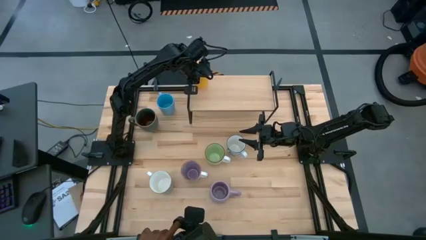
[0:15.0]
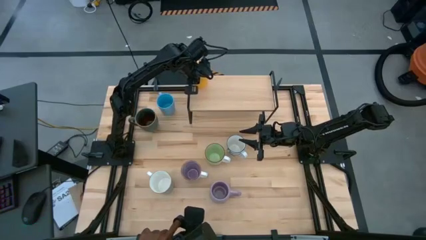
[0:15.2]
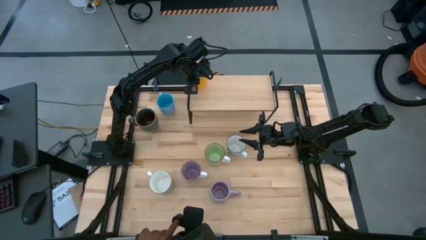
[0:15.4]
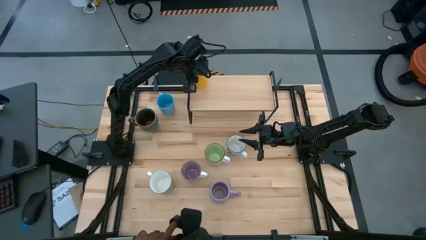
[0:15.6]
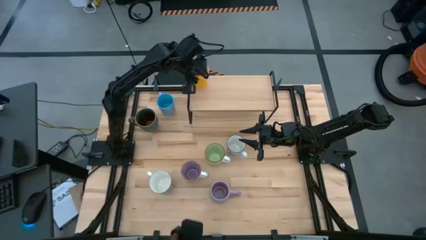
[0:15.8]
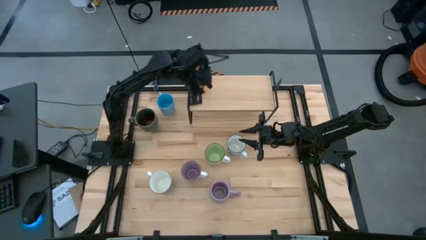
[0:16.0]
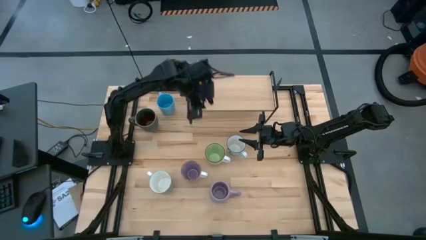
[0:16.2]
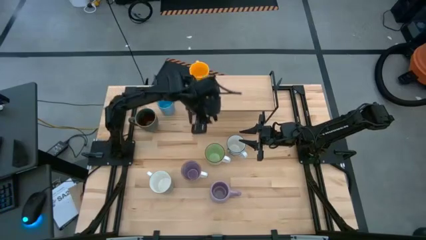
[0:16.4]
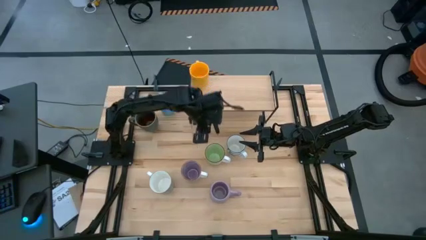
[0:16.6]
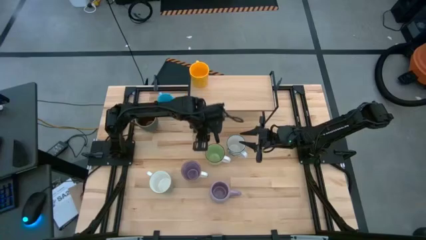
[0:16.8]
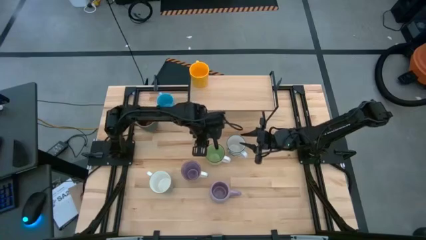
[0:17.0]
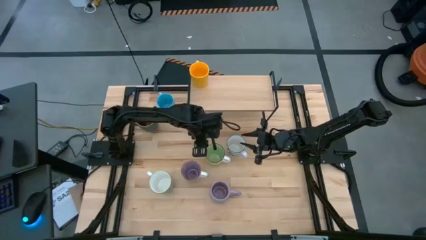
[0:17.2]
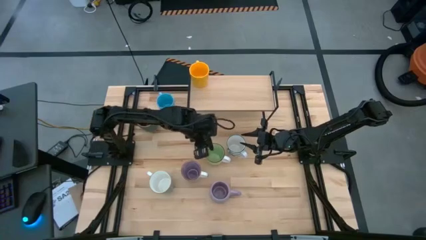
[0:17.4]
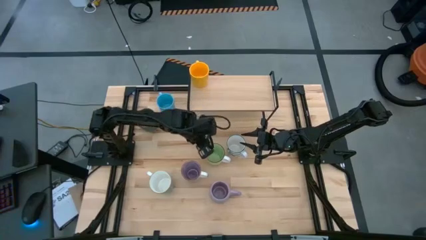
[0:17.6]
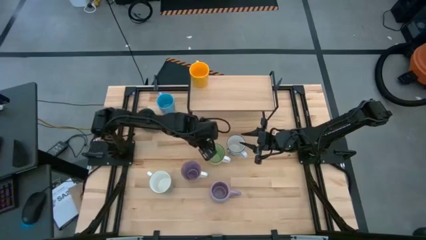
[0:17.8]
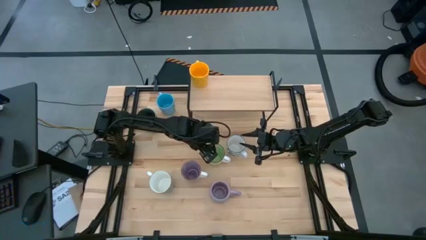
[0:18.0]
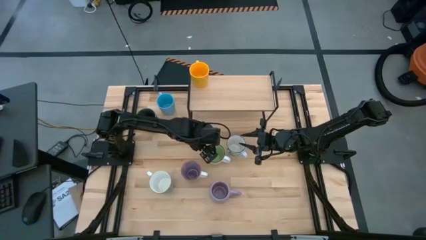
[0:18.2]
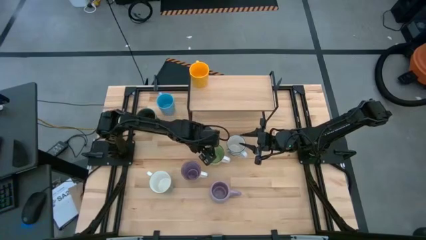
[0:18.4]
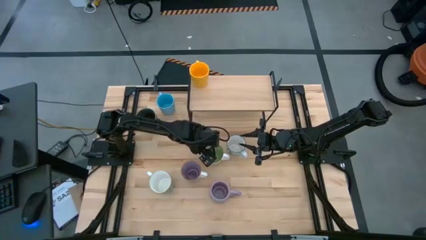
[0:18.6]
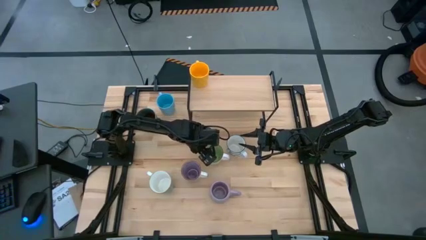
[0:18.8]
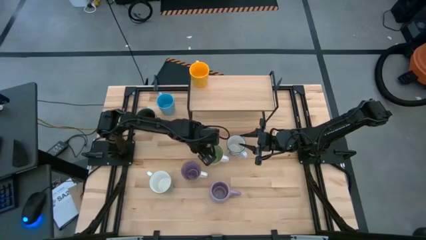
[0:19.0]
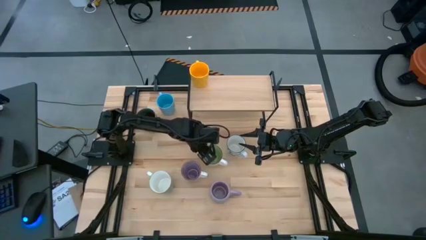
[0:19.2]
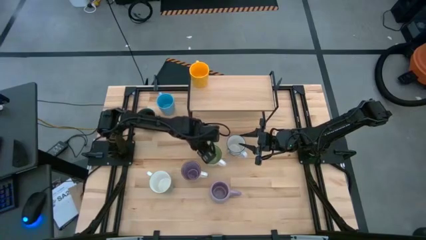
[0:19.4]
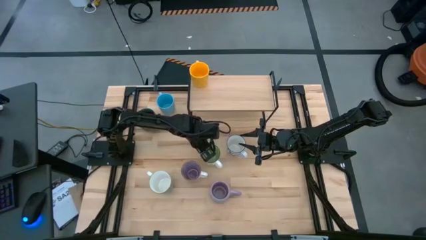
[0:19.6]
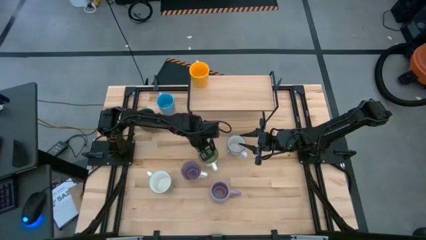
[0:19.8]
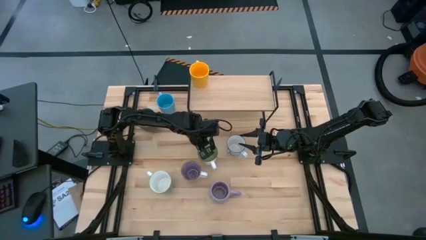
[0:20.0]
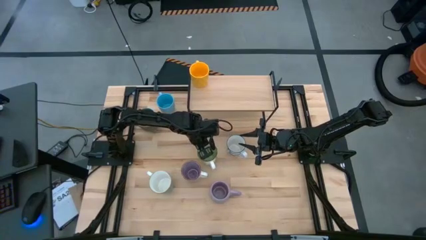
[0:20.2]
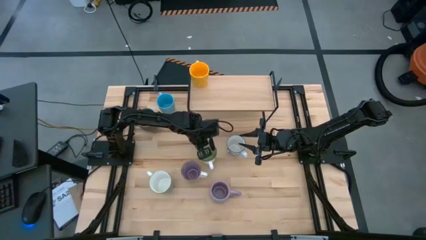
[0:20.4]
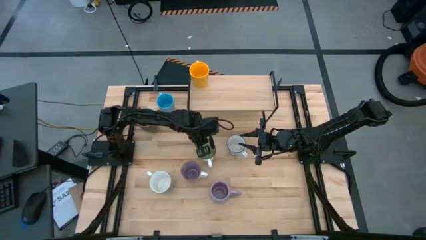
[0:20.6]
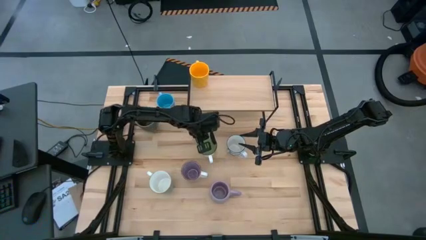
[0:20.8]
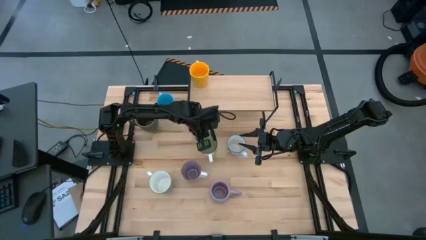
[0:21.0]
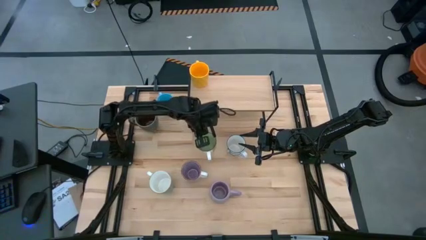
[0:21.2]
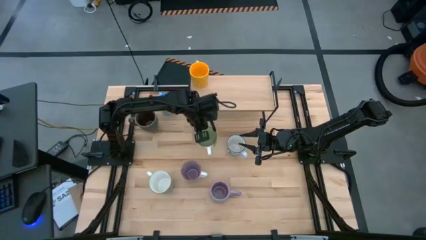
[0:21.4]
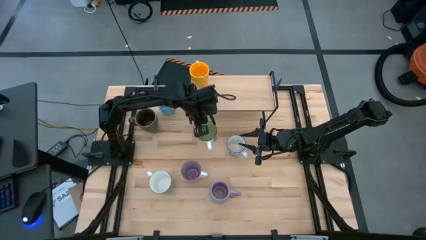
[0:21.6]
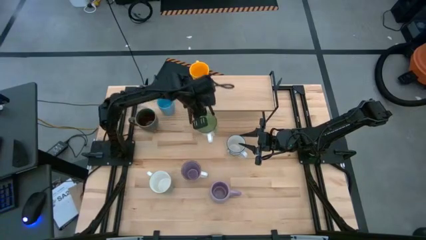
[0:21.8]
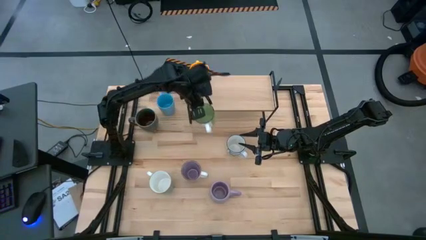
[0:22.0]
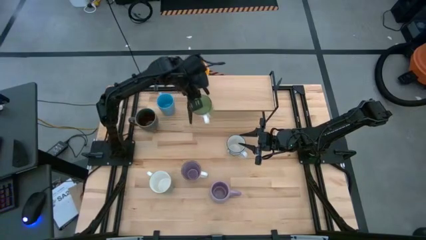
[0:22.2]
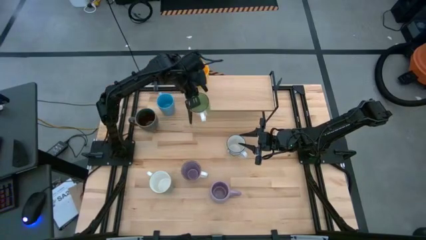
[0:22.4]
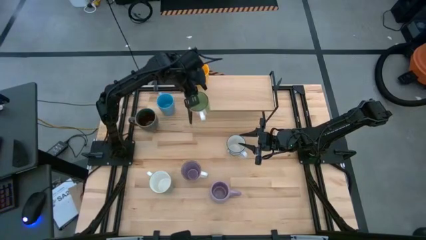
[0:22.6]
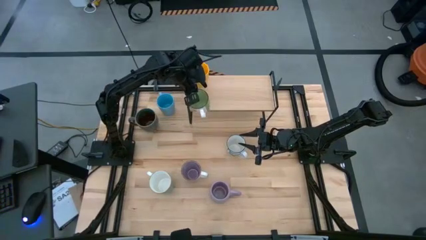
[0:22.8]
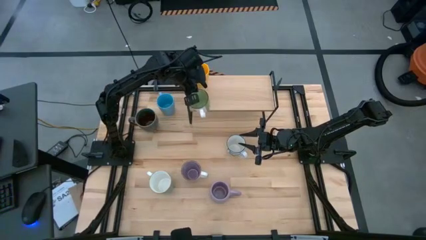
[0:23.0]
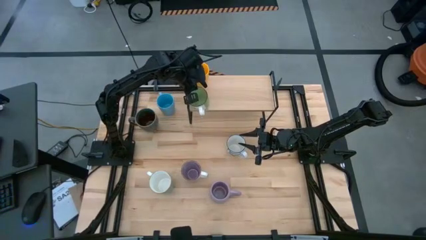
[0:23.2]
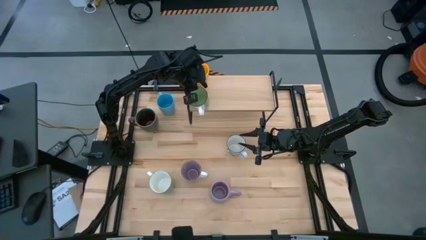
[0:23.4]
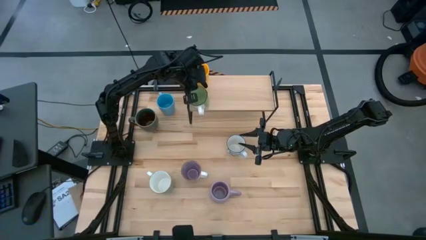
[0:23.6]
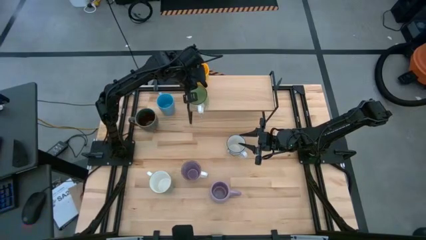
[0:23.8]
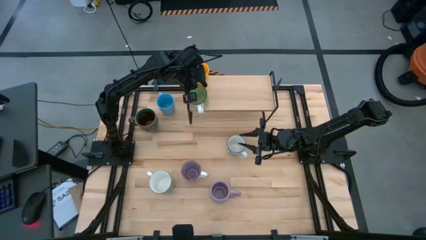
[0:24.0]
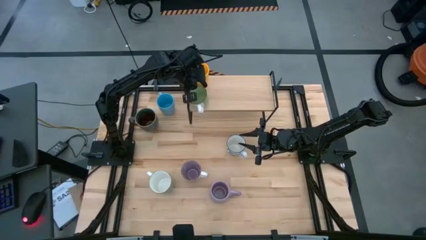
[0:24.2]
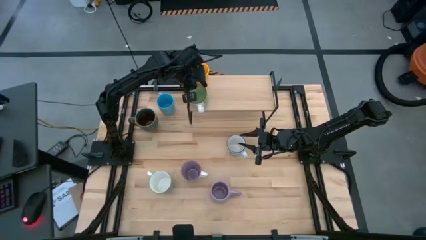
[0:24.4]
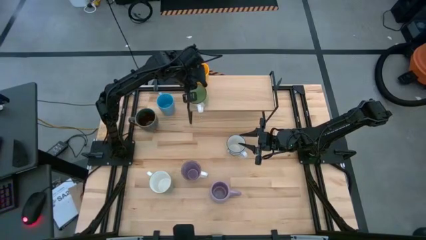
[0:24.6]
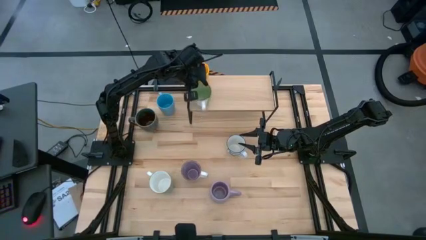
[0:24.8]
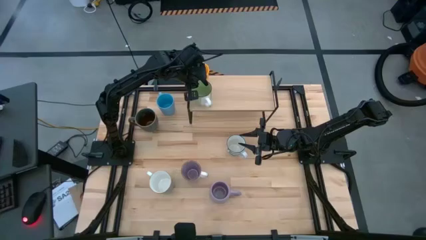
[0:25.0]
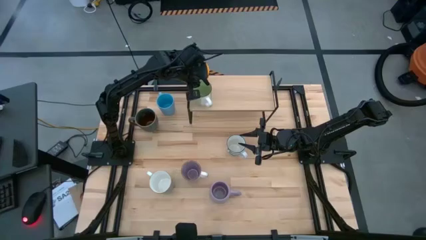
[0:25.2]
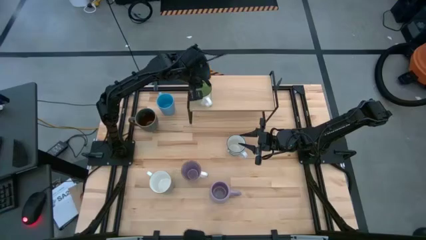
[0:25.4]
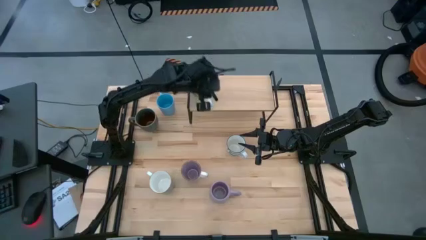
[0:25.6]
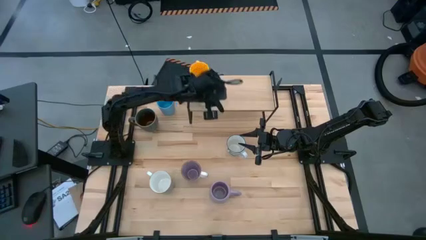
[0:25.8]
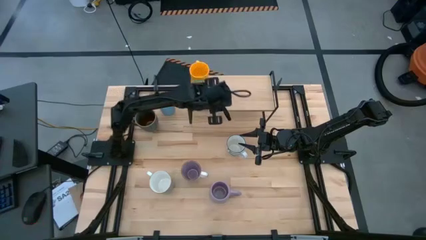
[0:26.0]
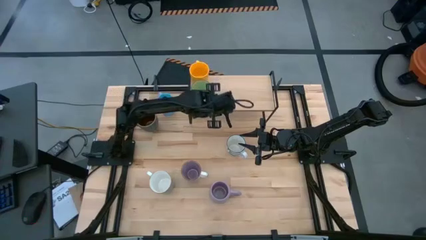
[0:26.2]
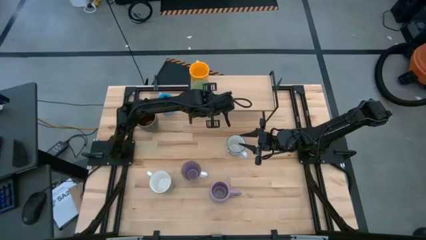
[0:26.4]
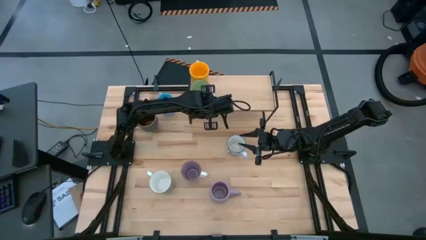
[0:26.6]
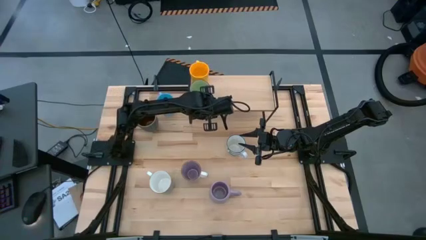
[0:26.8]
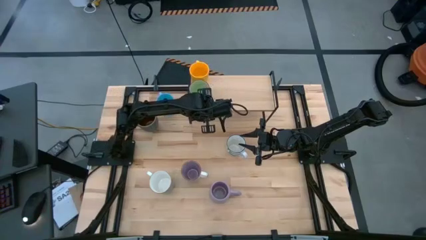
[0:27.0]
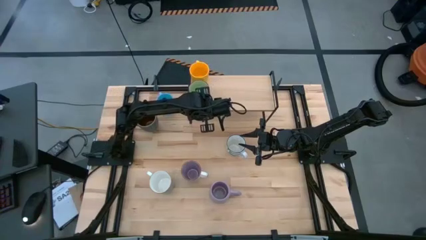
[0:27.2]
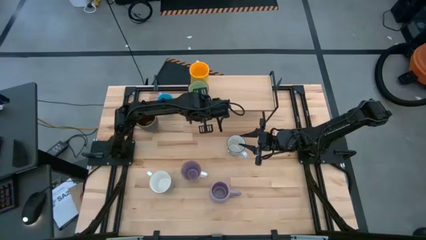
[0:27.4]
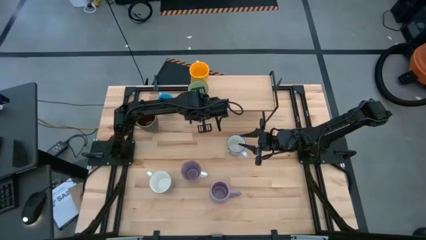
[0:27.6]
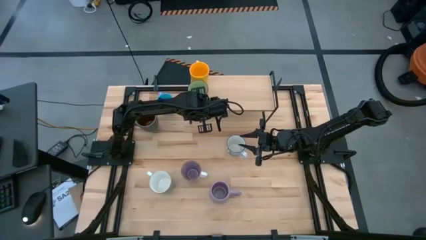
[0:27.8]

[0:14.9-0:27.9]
Task: Place coffee mugs
Put the green mug on the shelf

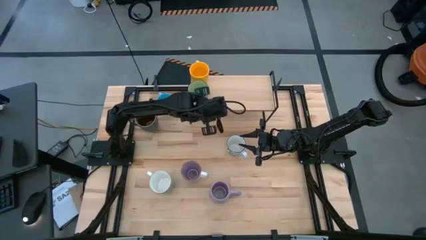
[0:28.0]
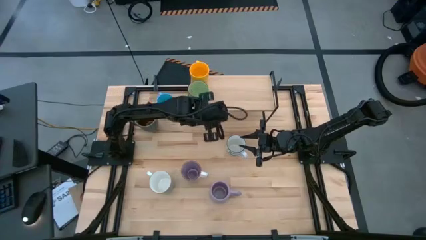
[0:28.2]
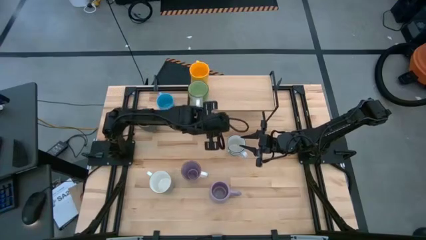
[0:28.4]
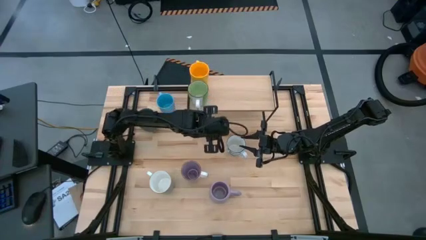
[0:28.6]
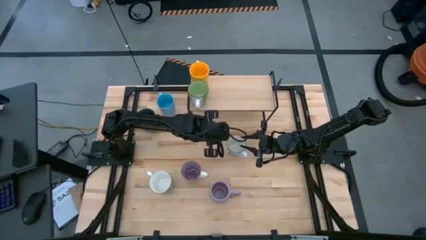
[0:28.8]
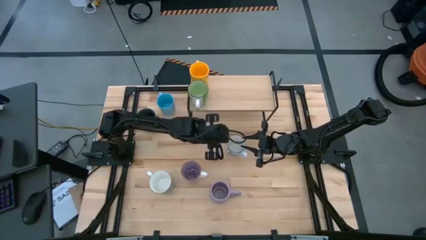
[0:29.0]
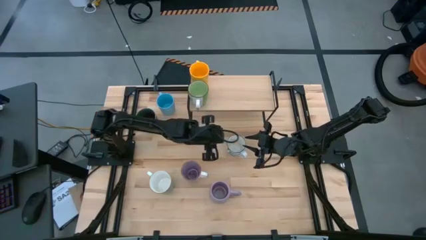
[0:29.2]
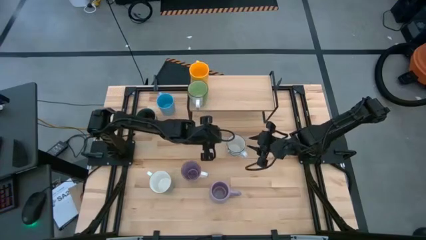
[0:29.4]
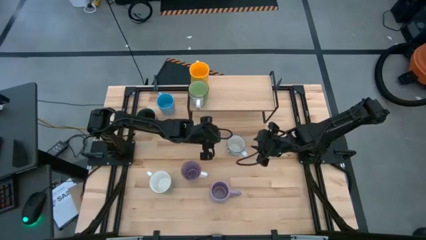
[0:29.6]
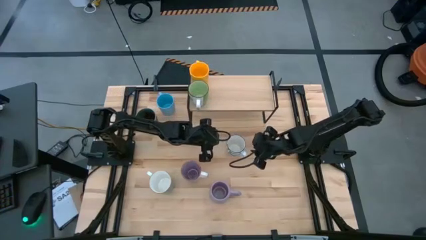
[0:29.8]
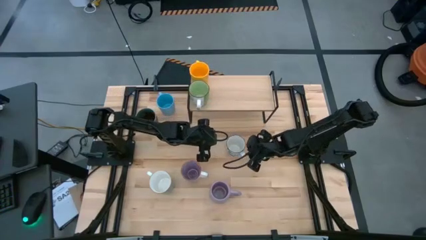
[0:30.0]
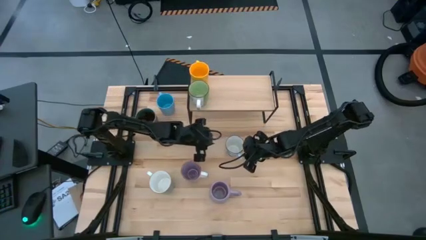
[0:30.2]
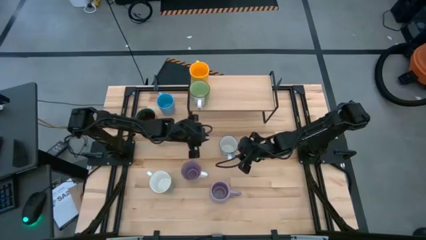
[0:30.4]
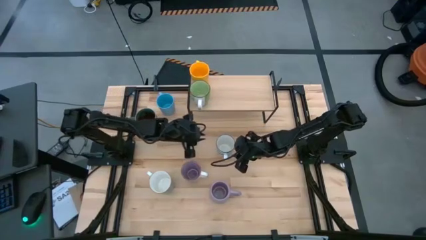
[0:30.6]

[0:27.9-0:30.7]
Adjust the blue mug
